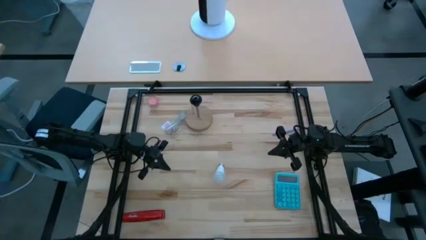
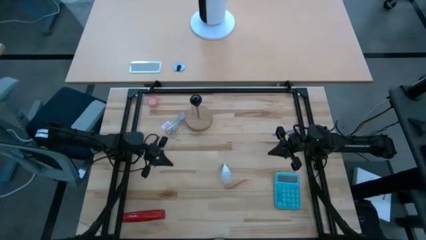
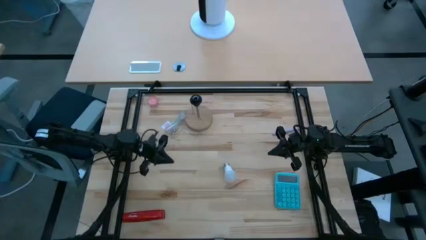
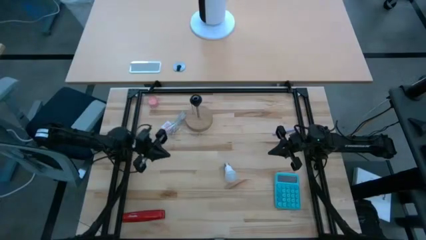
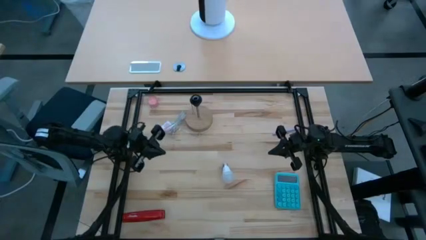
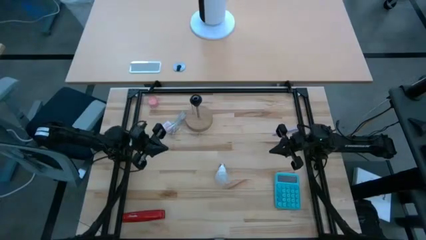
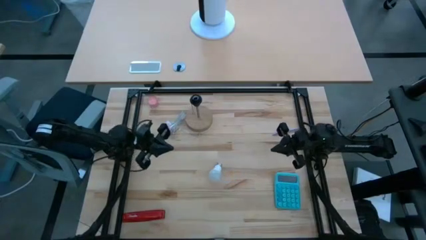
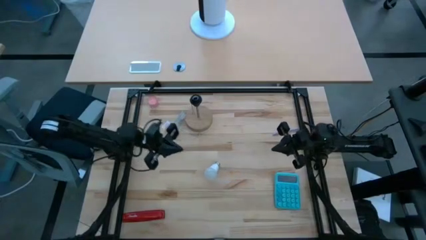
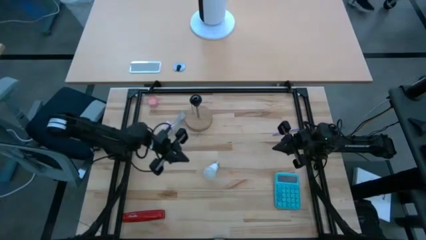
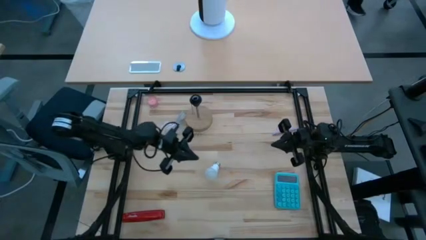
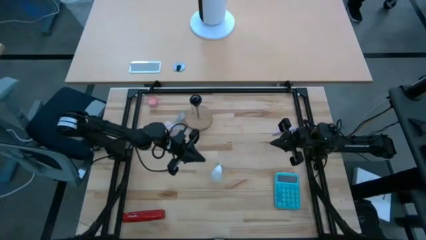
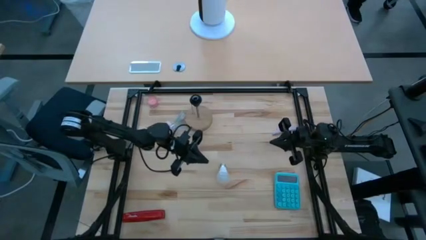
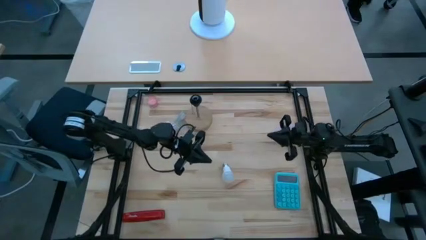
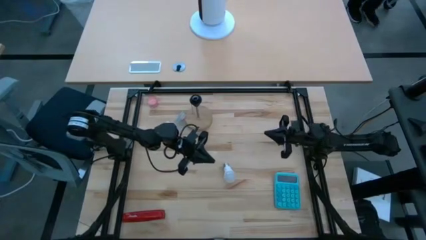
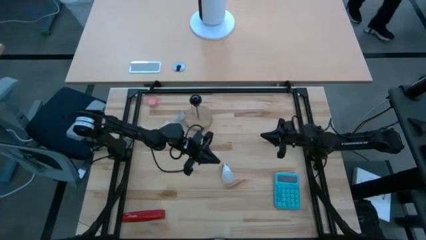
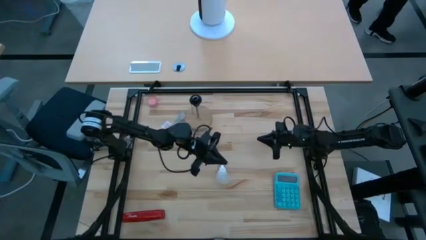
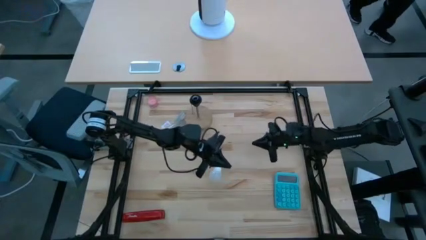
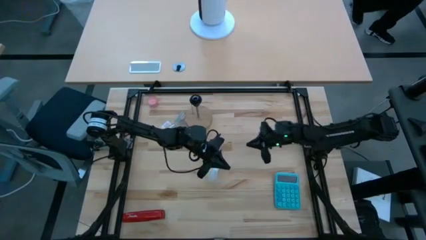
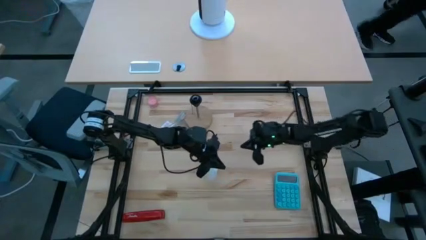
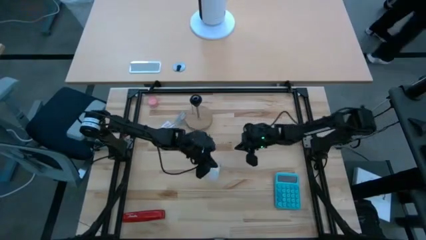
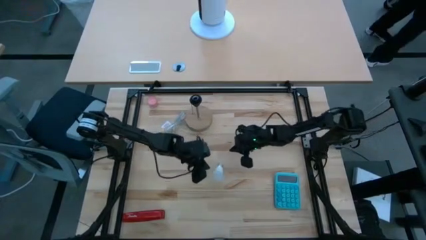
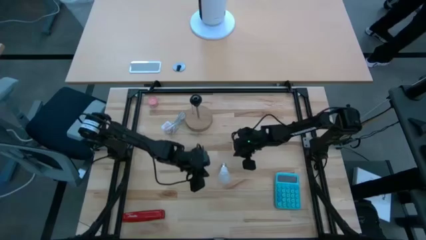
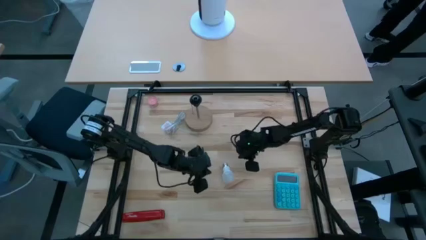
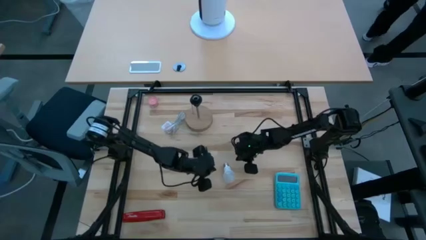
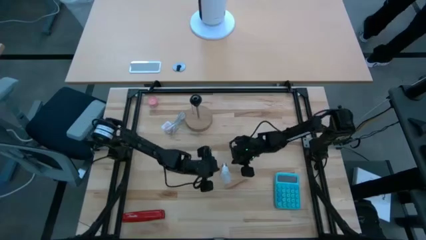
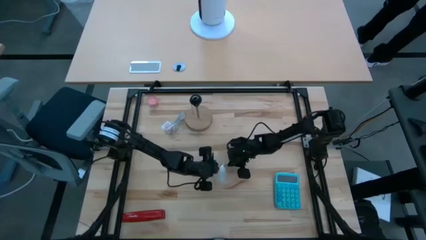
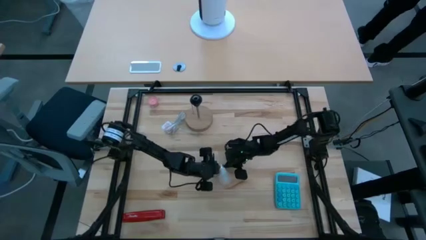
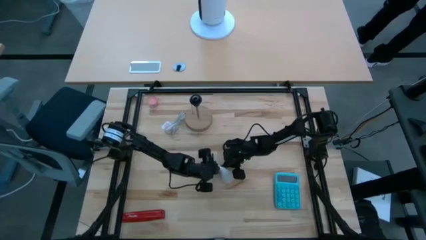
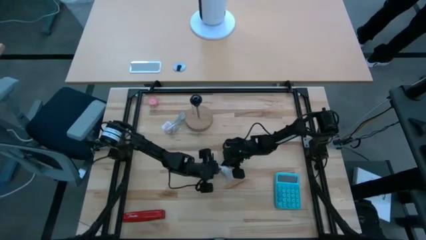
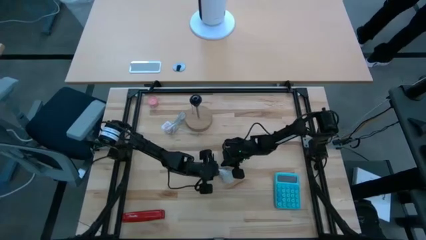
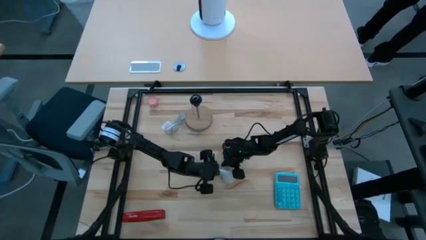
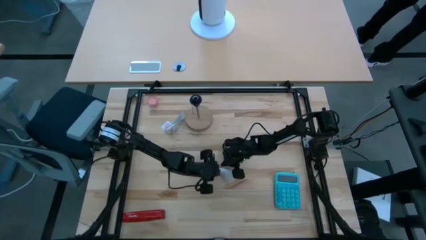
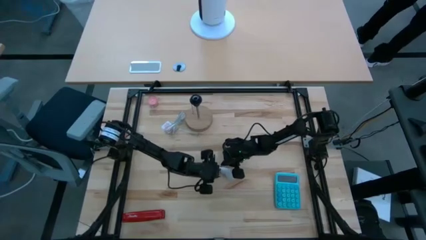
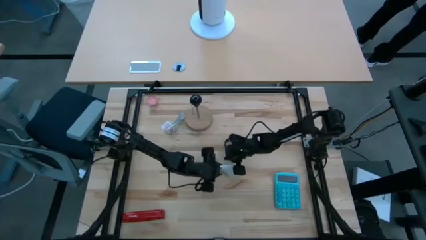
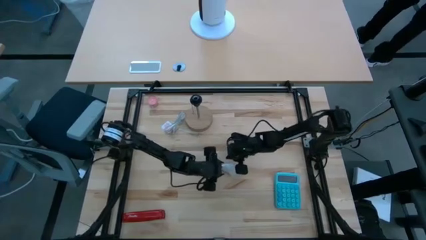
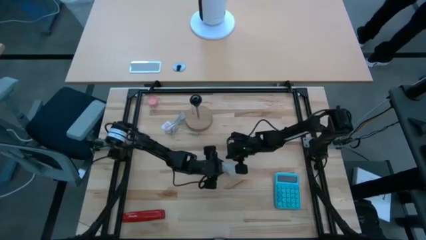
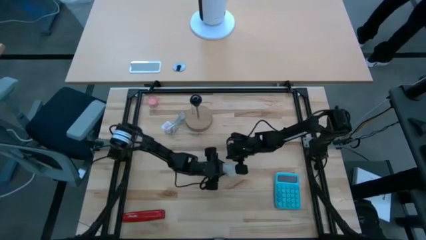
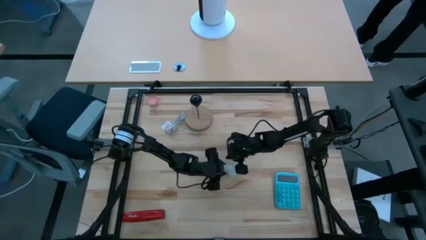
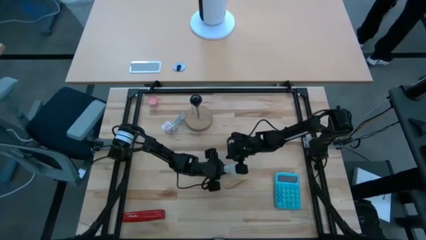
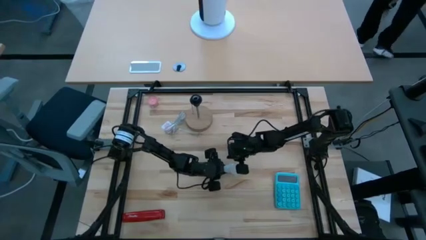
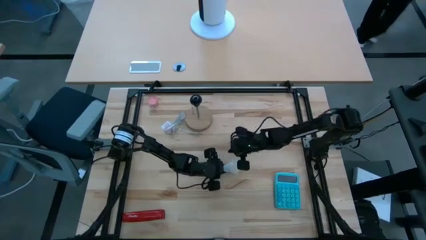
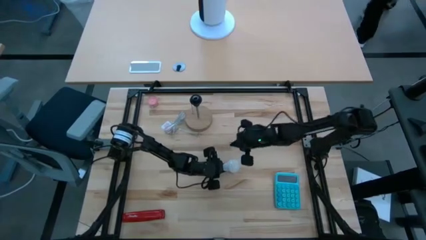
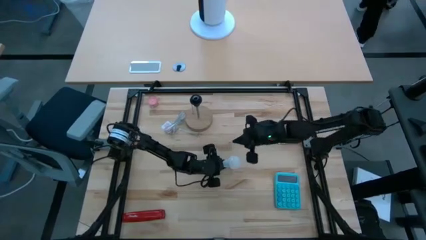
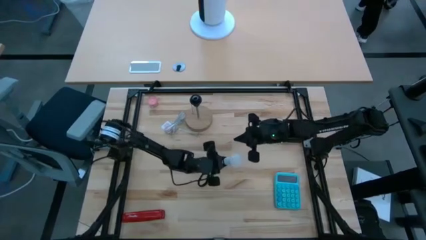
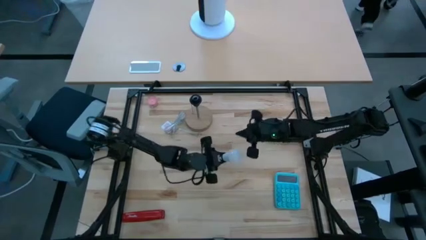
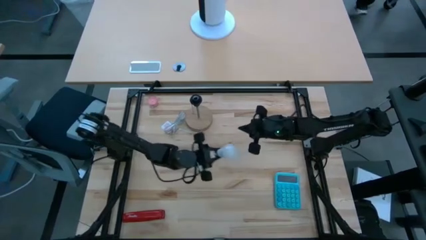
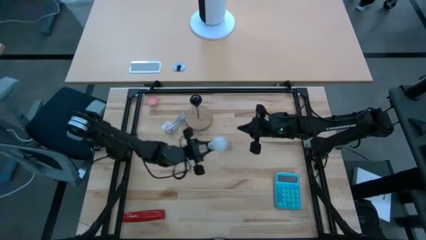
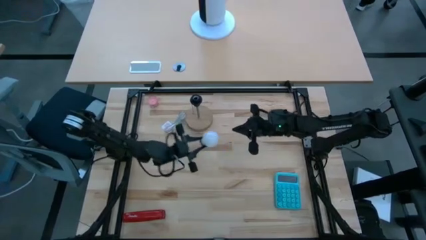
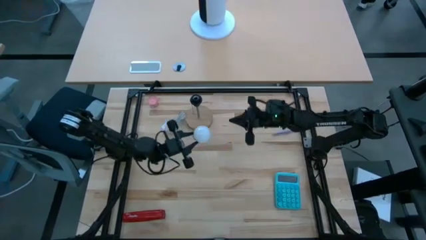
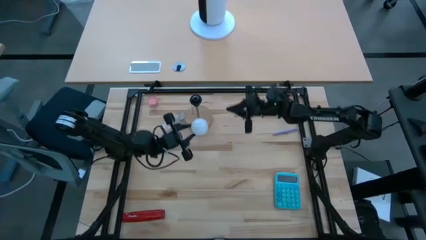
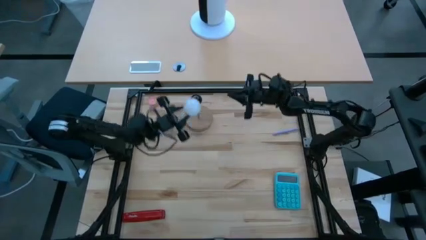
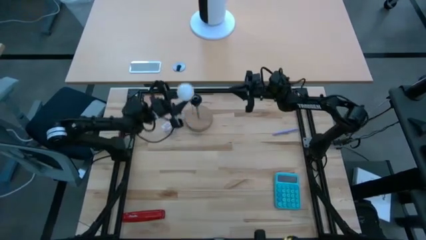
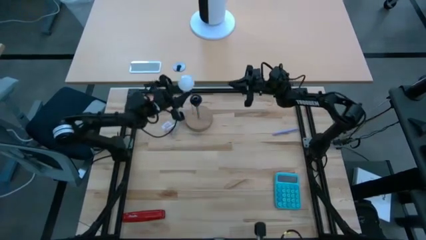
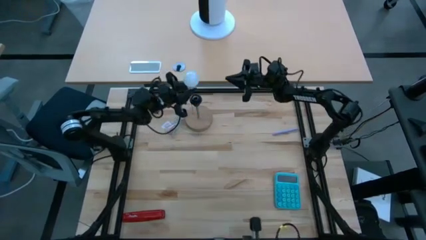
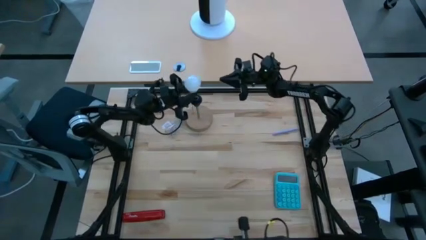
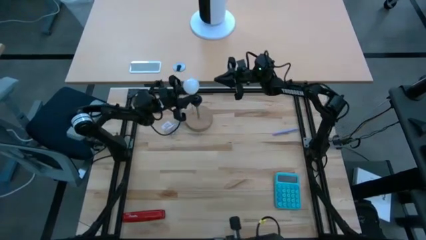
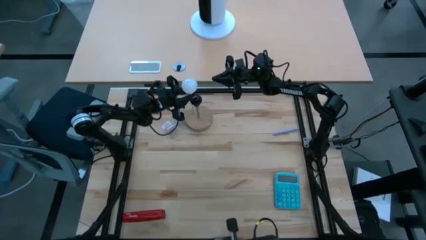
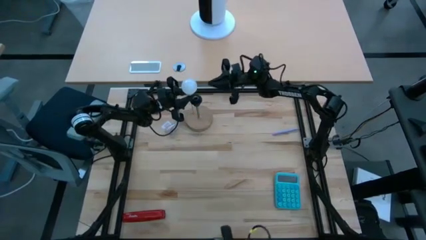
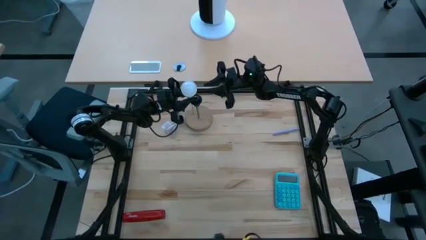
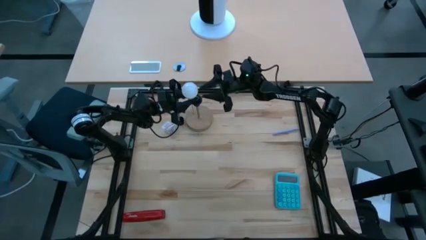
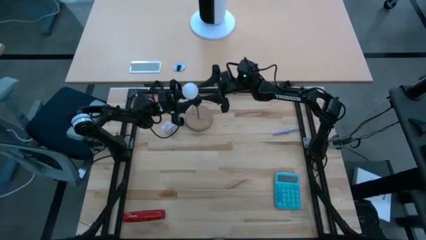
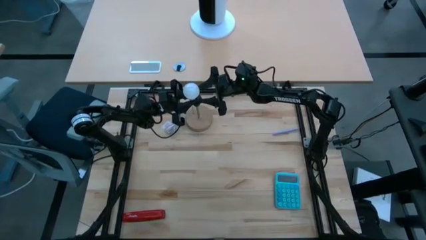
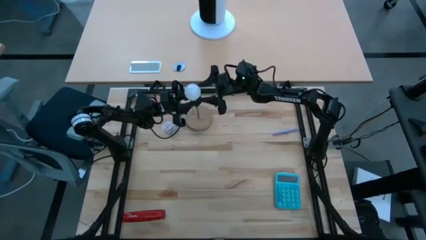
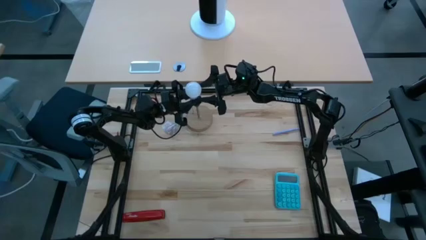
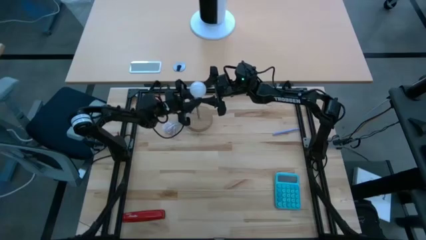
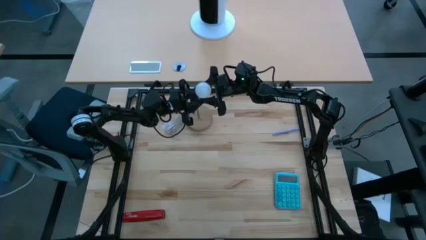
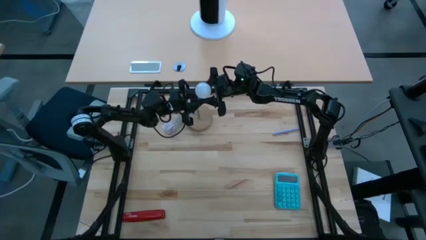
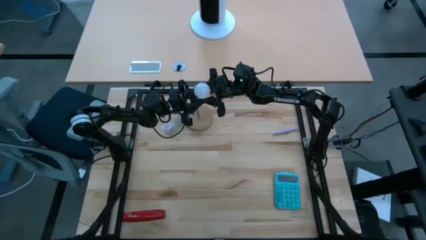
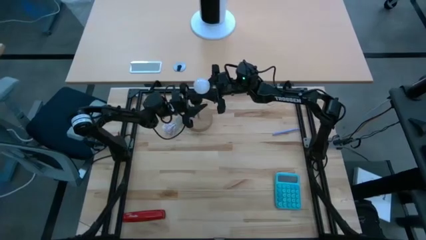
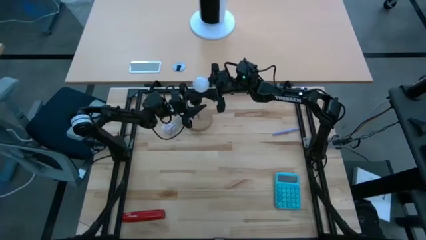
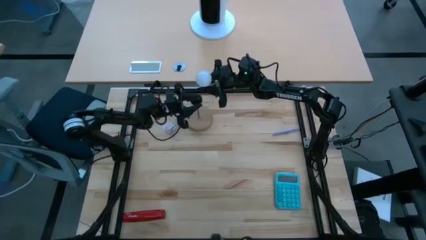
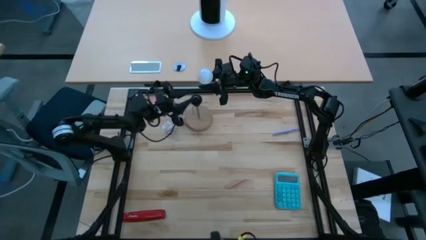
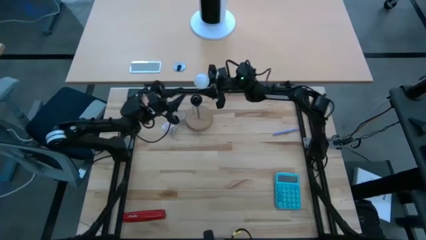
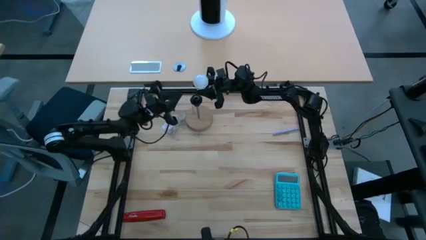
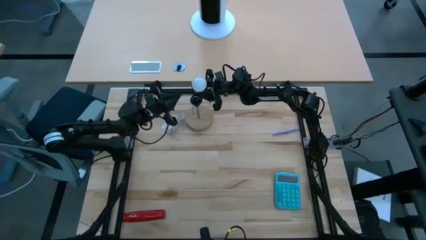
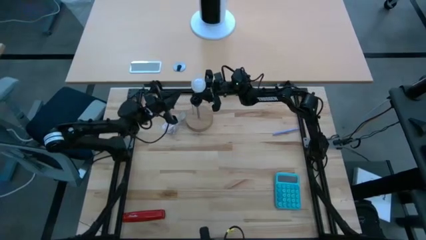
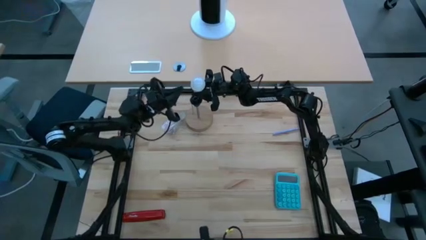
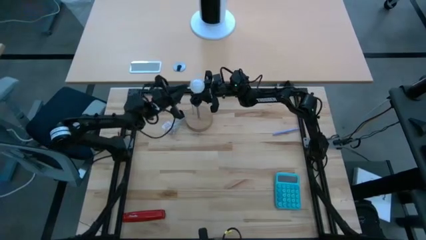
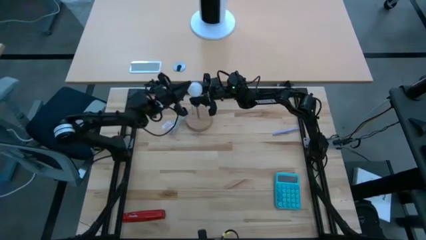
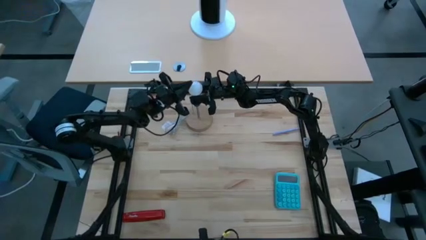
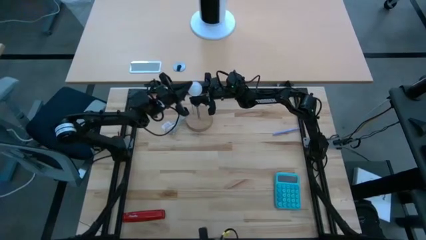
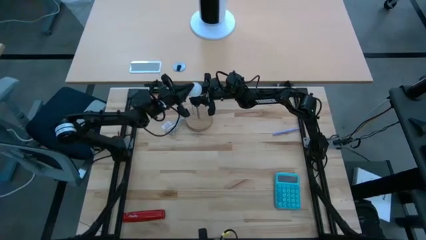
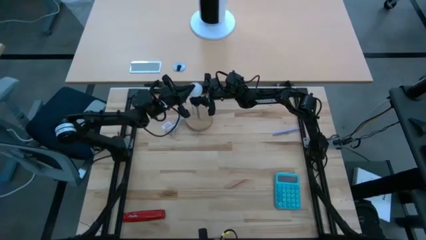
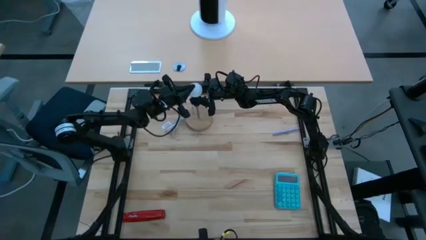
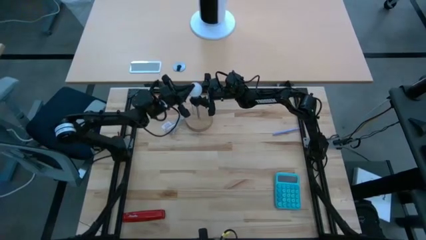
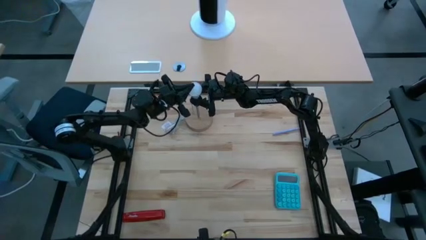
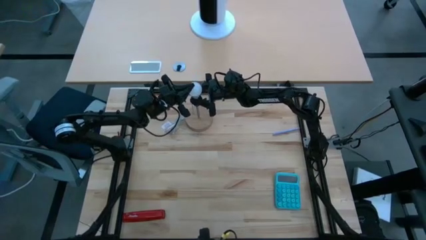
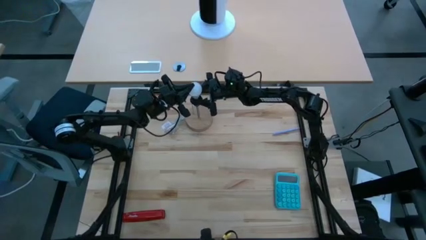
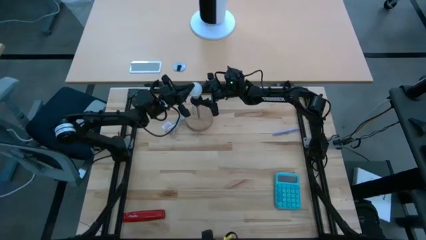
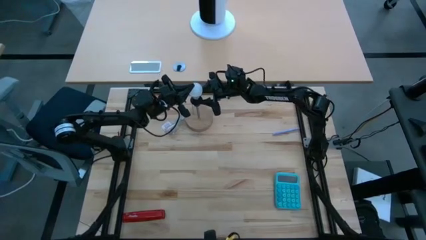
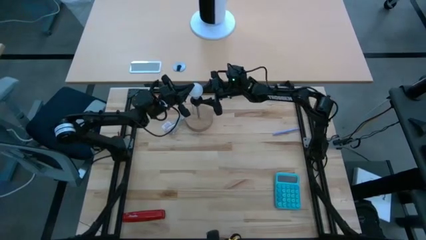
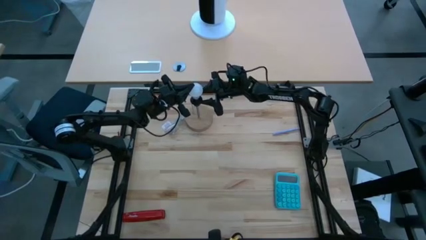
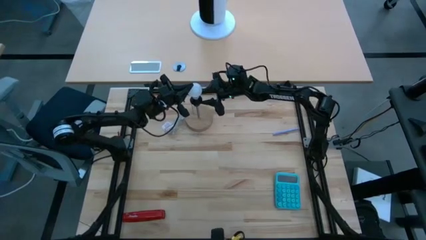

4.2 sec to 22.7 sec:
Task: Screw lightbulb
Insert the lightbulb into the wooden table lamp
